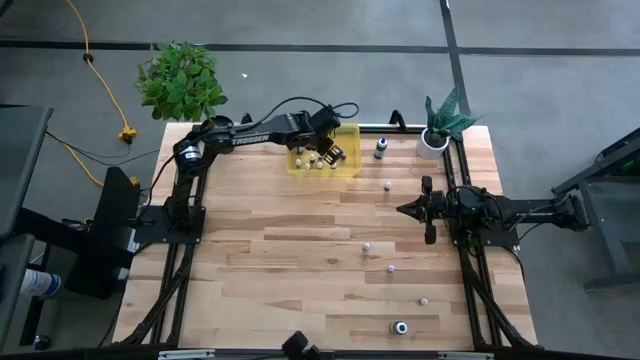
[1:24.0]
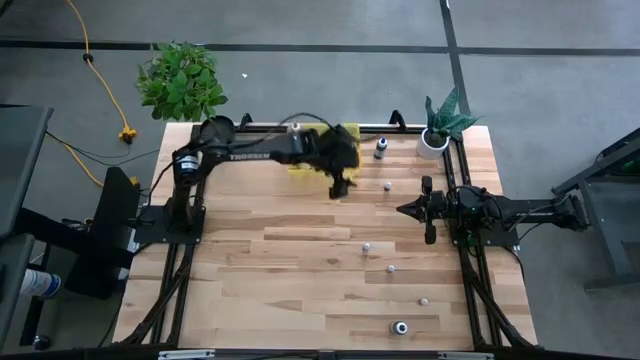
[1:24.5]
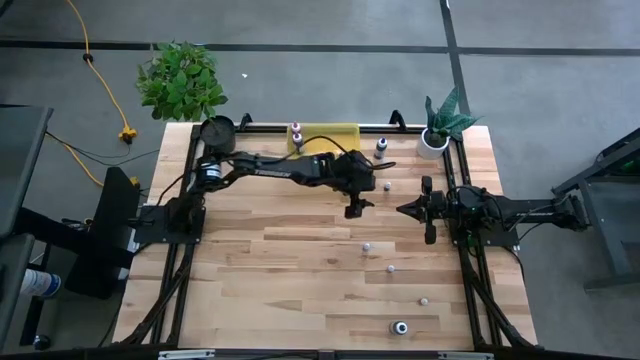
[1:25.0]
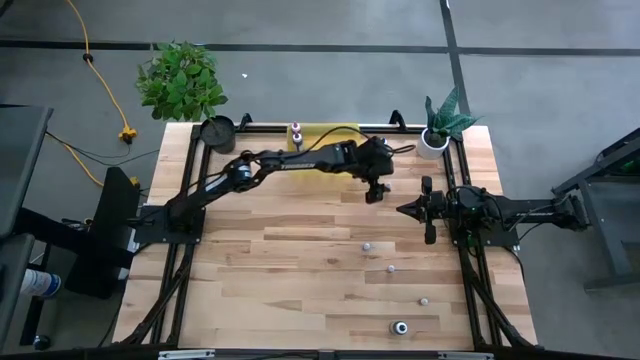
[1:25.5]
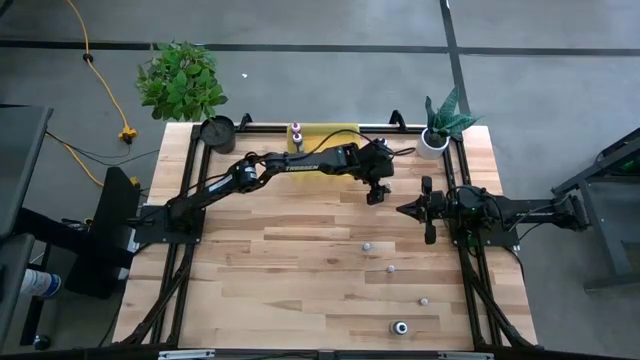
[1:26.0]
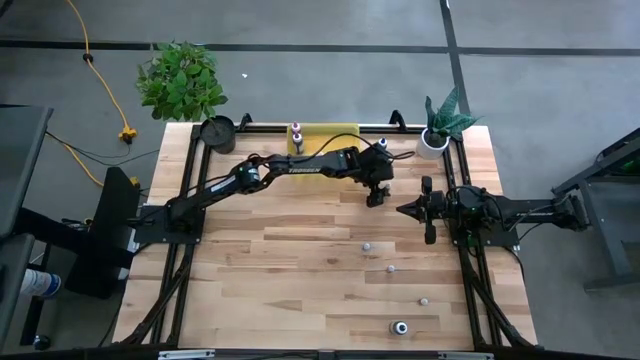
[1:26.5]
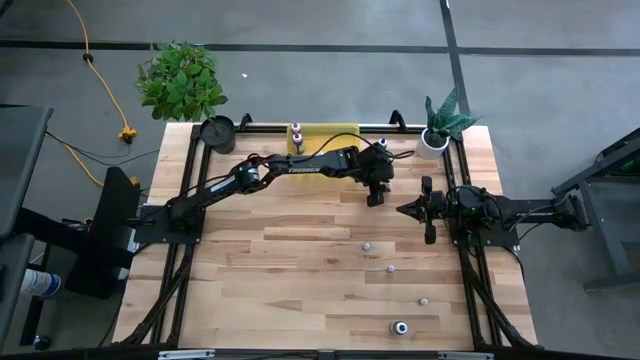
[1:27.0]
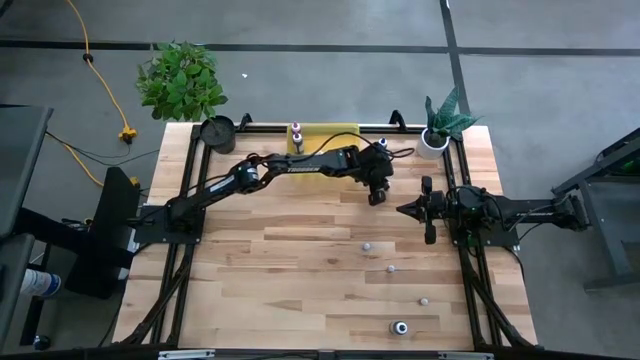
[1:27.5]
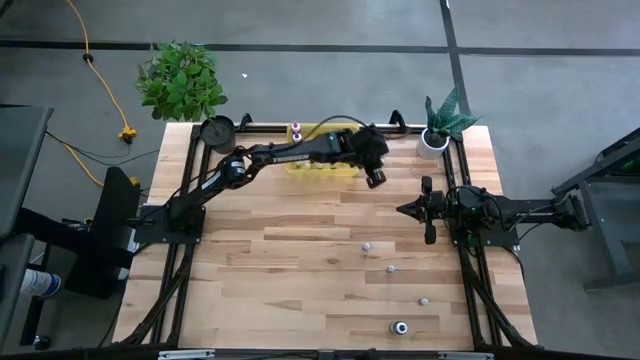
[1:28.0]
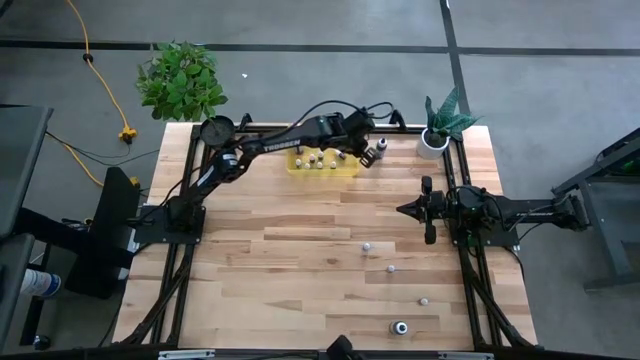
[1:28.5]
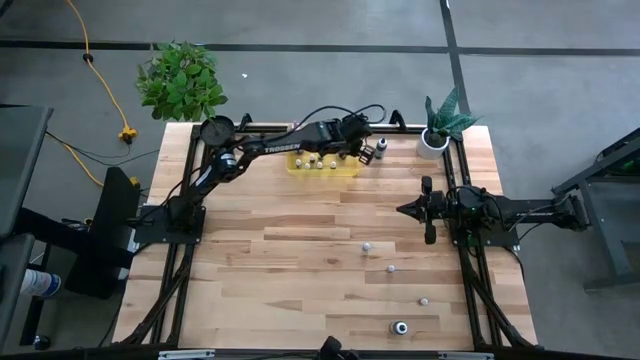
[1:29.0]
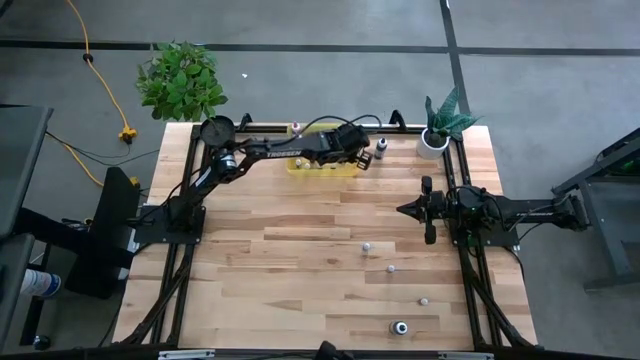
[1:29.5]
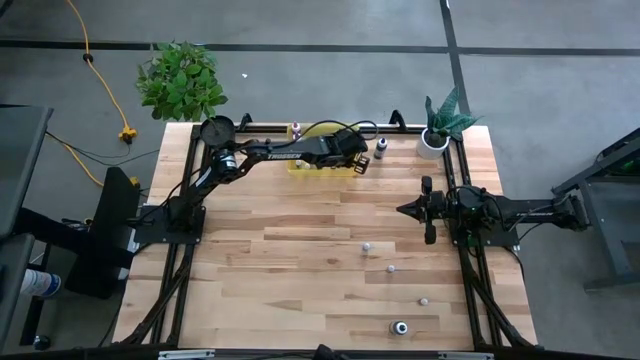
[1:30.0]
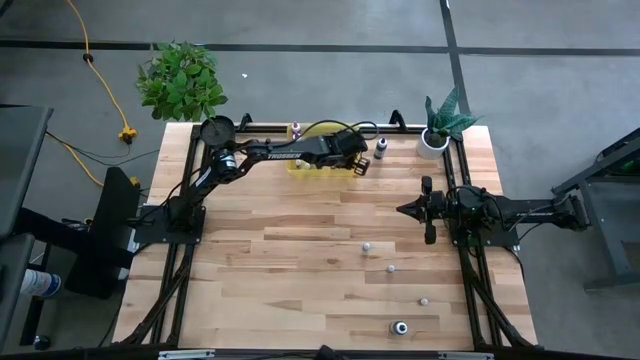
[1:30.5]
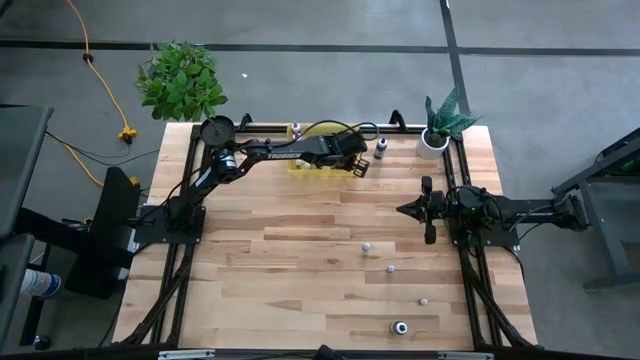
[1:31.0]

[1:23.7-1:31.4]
Task: Pick & Place food coloring
Put the small green food coloring bottle into the yellow container

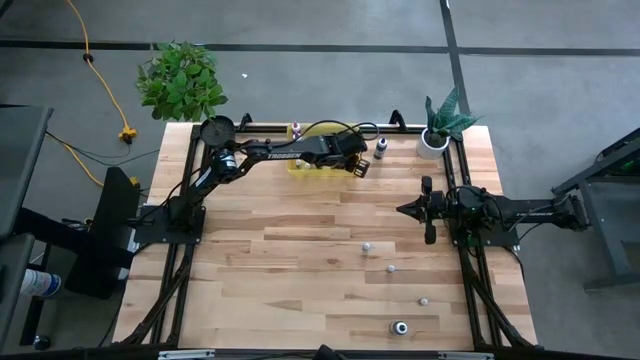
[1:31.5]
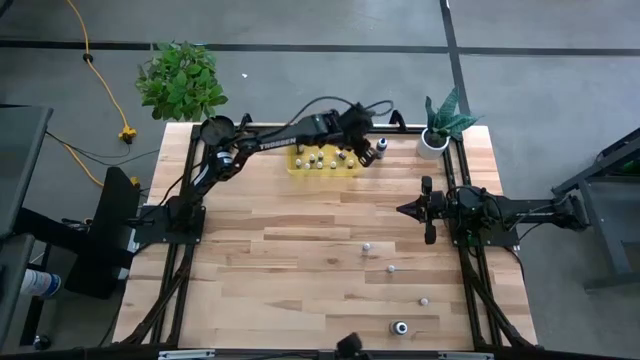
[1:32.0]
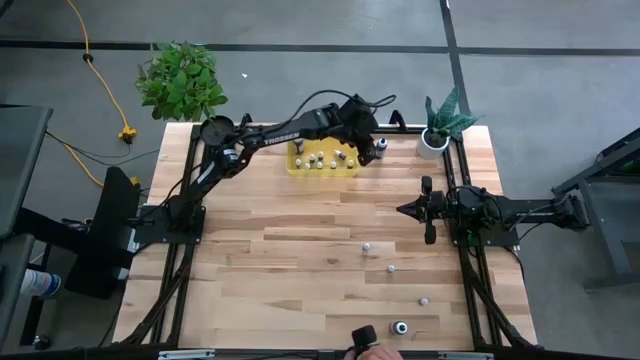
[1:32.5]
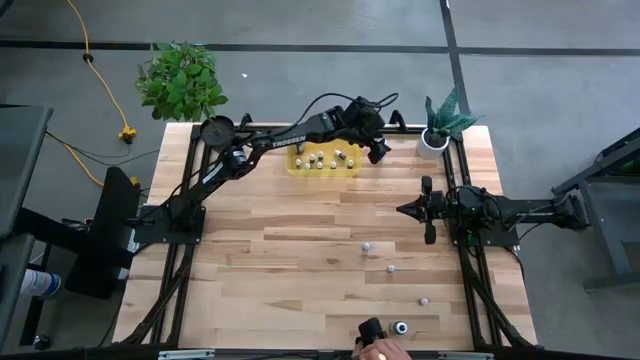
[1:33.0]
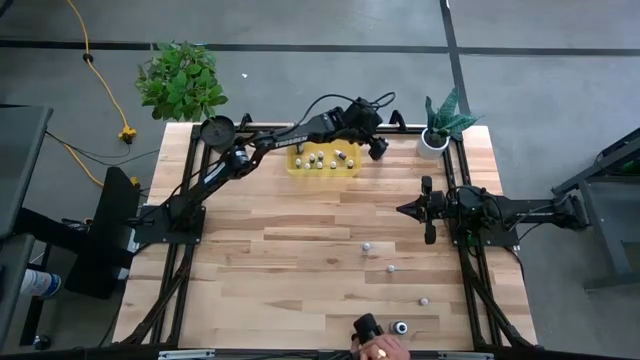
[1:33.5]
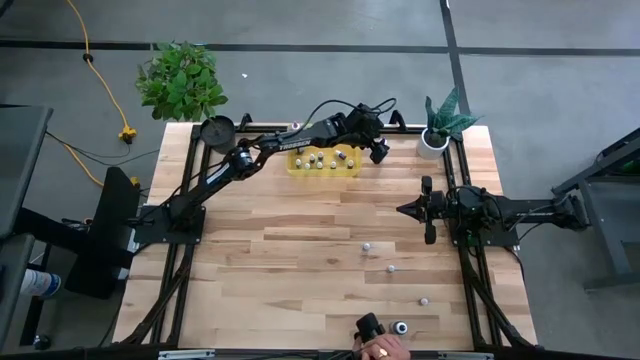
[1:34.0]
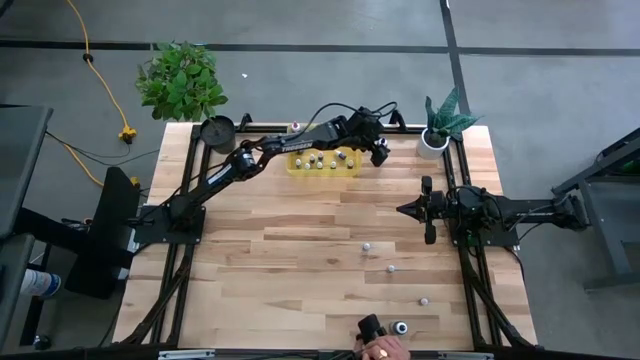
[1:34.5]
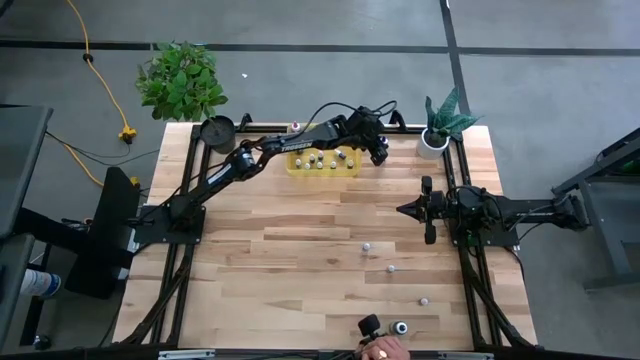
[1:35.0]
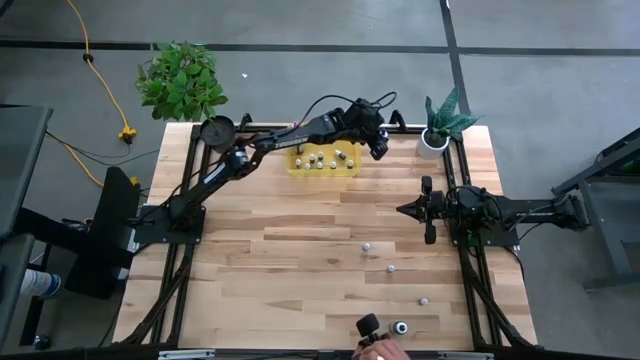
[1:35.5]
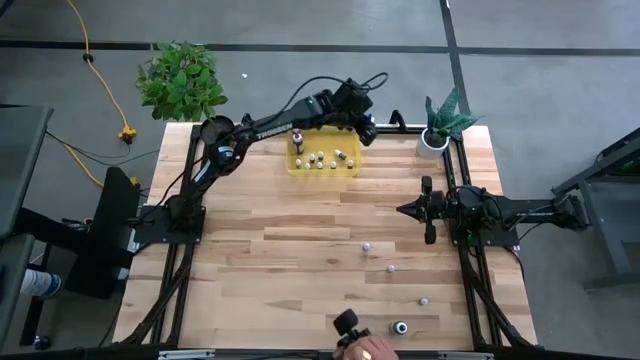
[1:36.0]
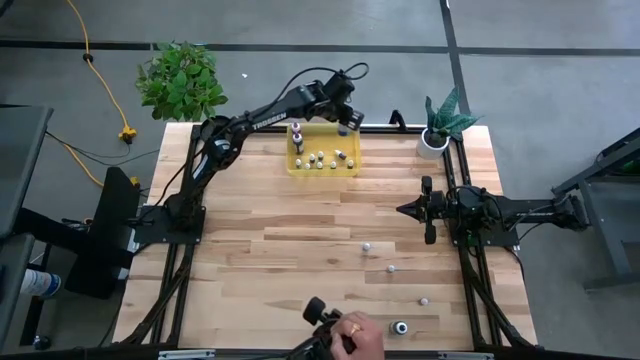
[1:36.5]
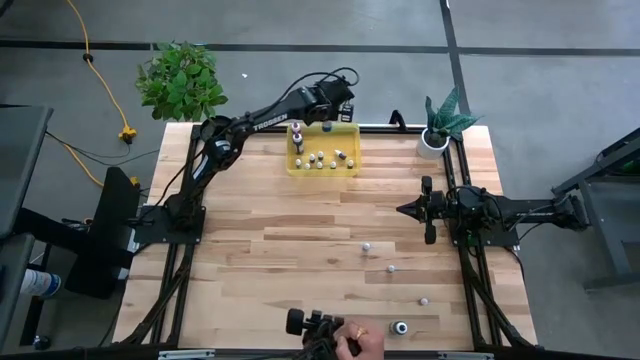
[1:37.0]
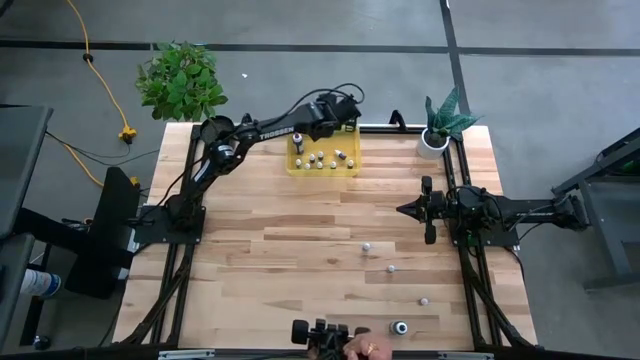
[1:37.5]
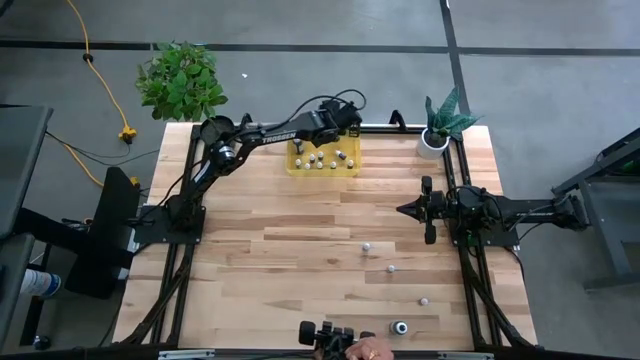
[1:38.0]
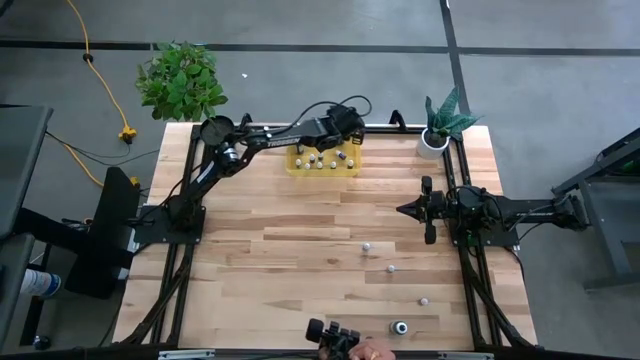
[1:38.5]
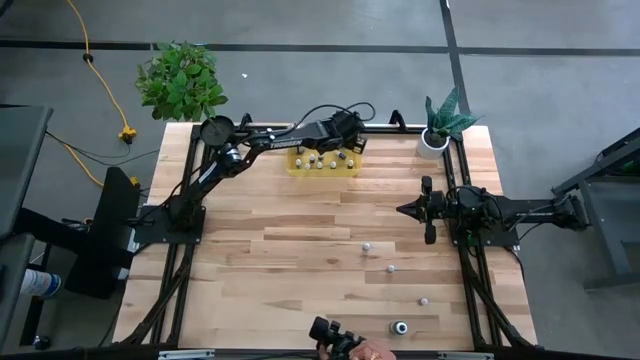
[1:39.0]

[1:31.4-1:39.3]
Put the big blue food coloring bottle into the yellow container

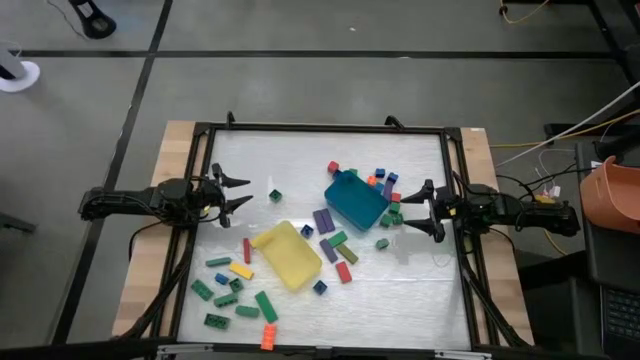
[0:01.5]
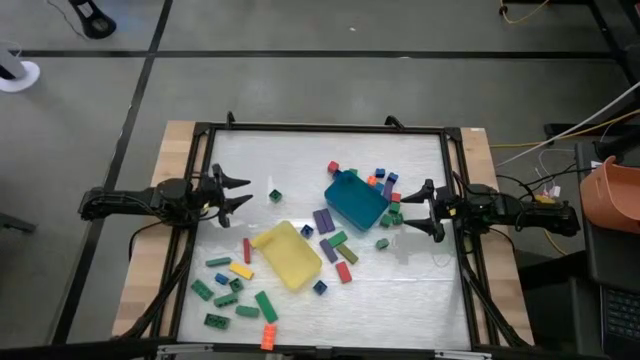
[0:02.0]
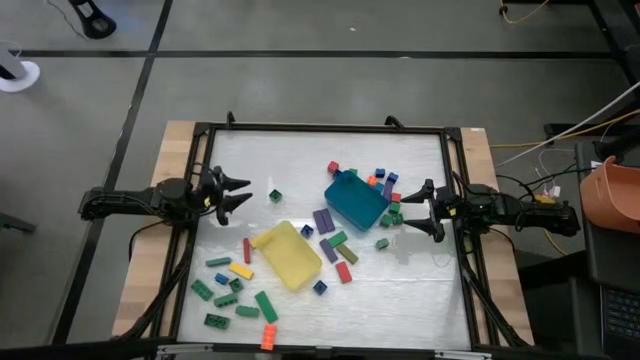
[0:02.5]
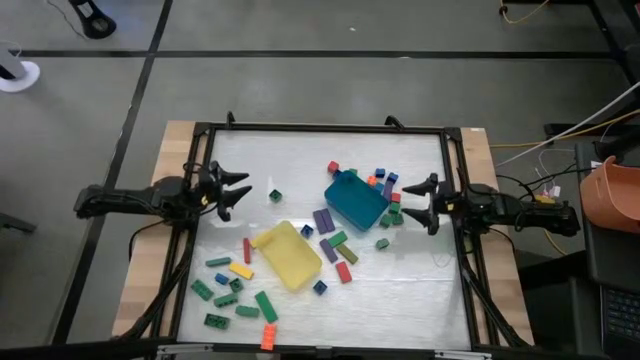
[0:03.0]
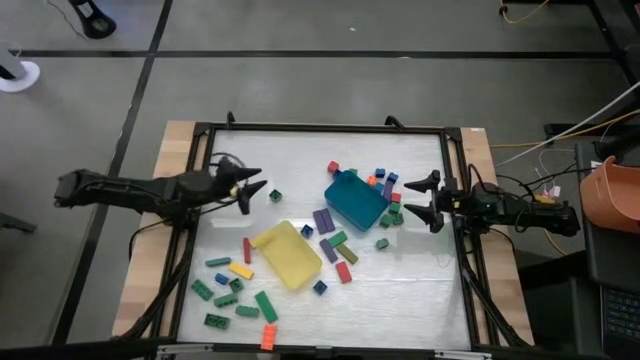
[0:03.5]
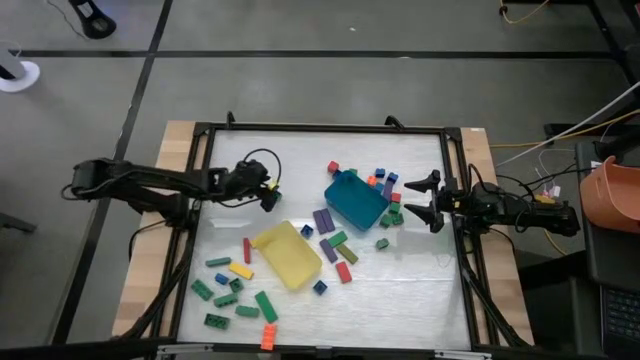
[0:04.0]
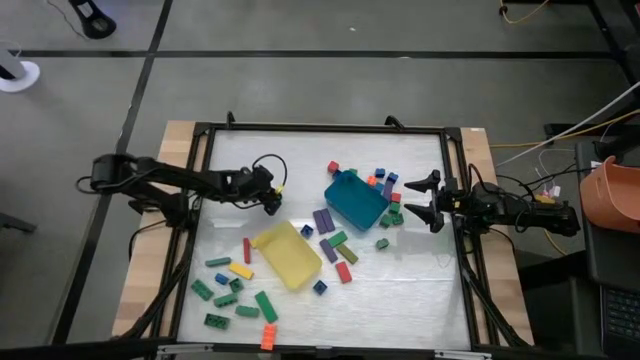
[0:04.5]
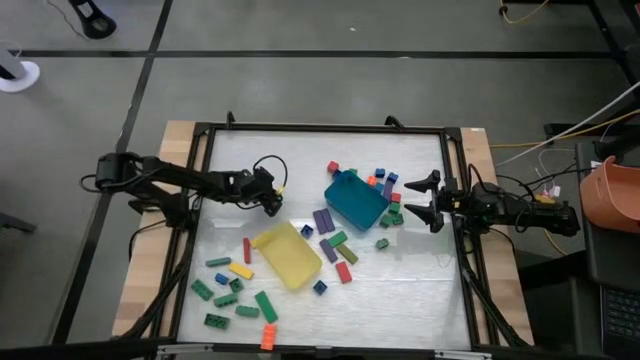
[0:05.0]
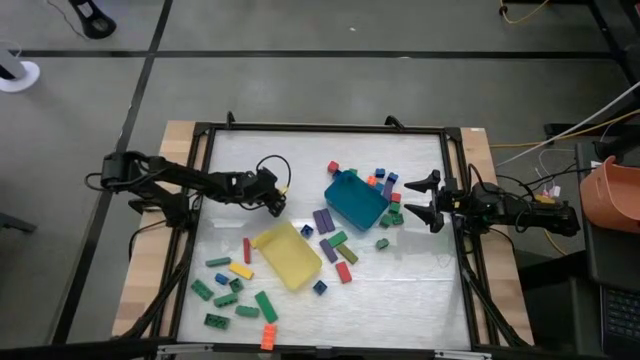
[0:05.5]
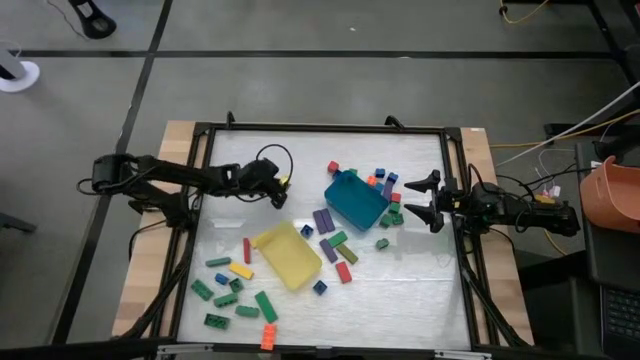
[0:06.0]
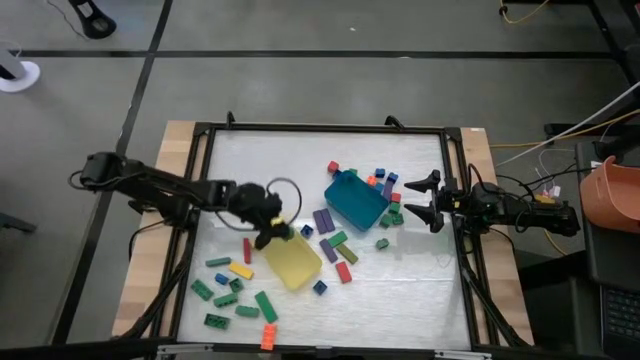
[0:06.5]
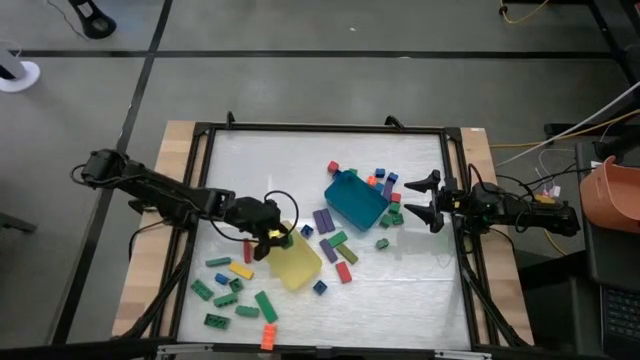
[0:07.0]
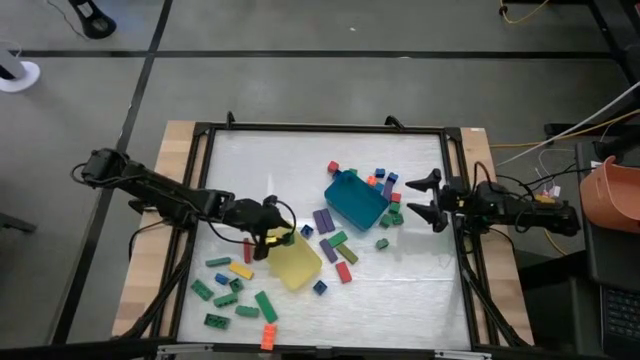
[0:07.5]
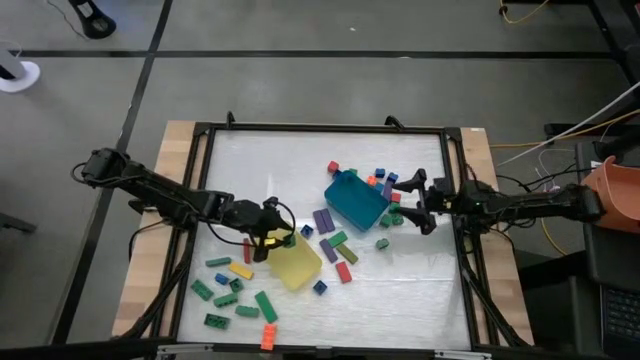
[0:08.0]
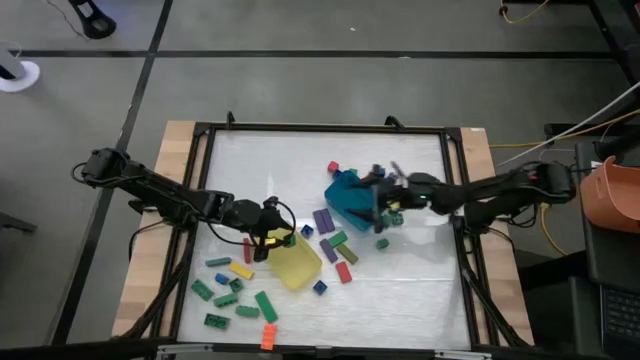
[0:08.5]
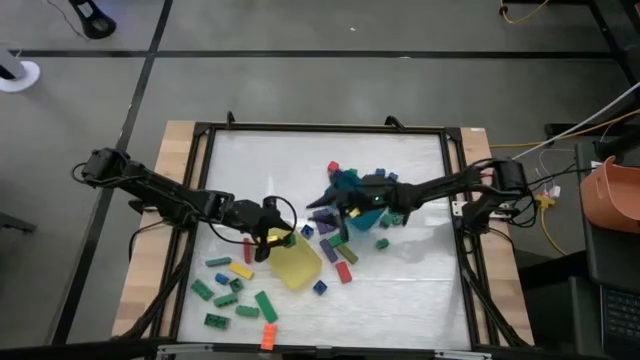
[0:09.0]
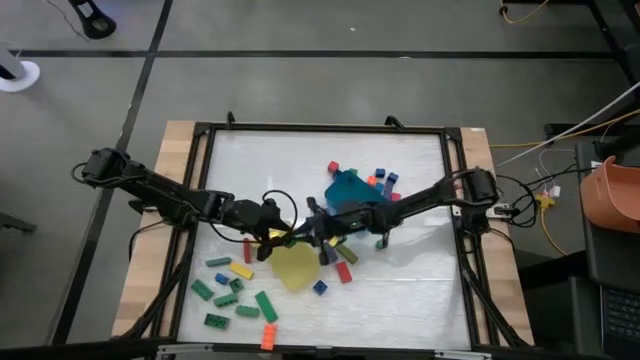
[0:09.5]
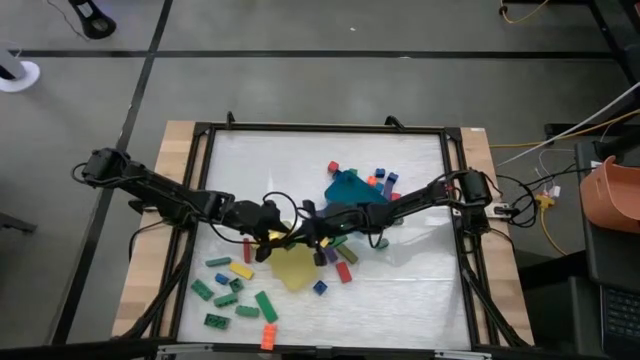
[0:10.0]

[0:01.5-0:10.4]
Task: Sort blocks by size
Put the small green game piece into the yellow bin
